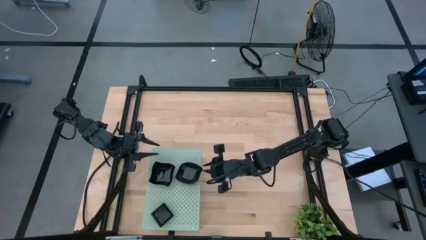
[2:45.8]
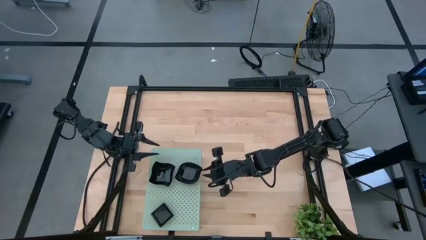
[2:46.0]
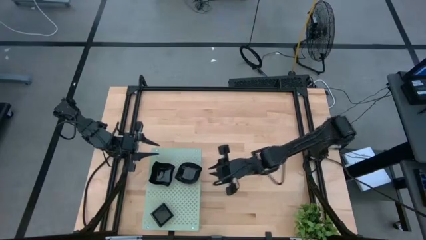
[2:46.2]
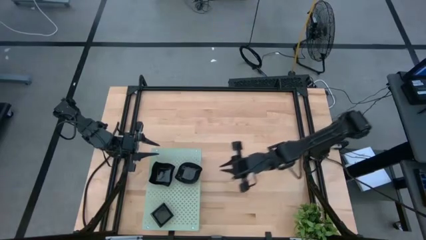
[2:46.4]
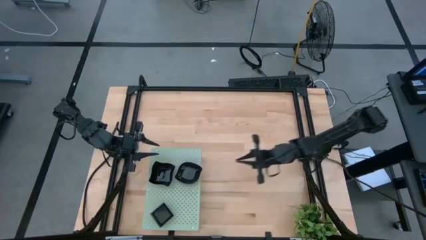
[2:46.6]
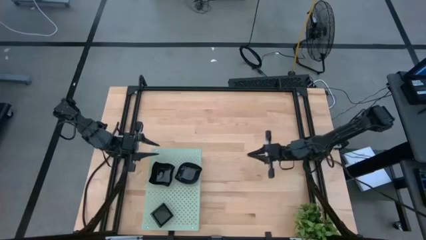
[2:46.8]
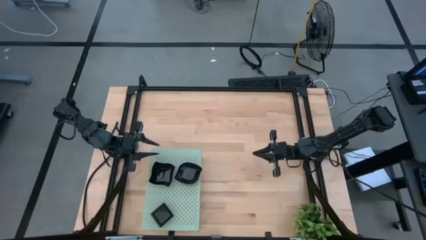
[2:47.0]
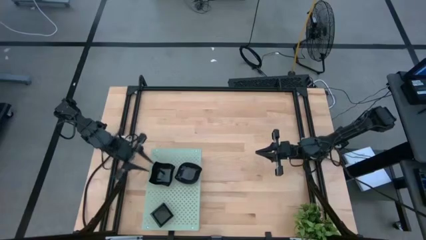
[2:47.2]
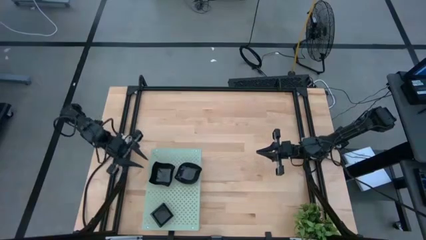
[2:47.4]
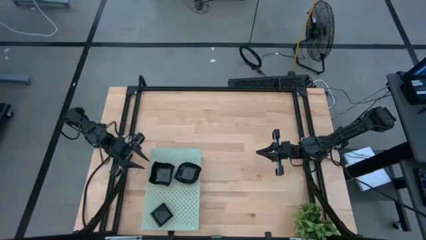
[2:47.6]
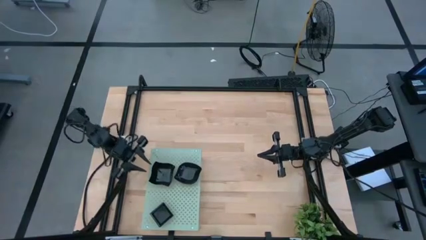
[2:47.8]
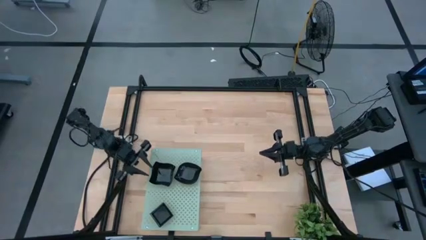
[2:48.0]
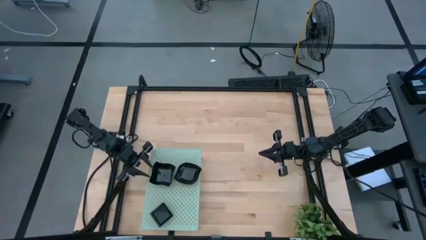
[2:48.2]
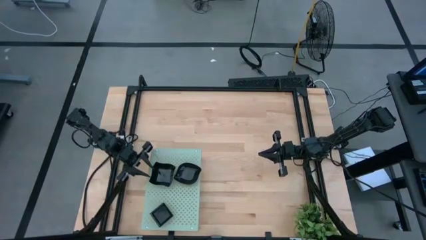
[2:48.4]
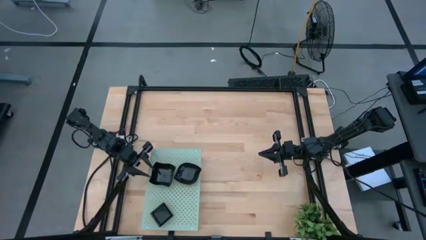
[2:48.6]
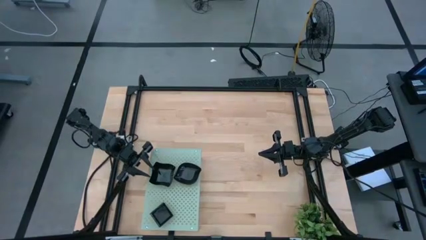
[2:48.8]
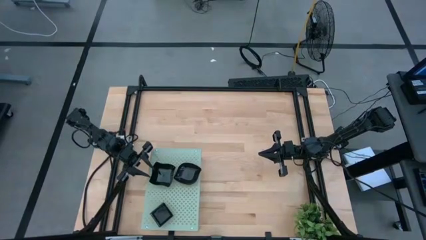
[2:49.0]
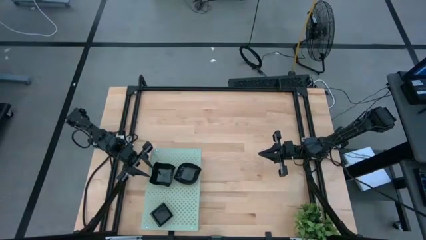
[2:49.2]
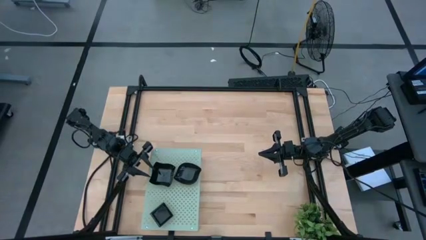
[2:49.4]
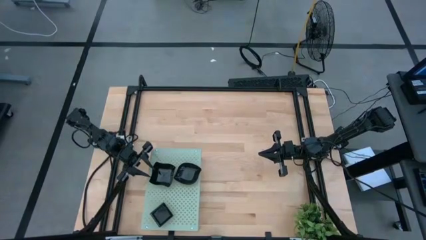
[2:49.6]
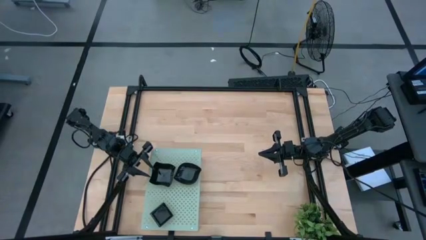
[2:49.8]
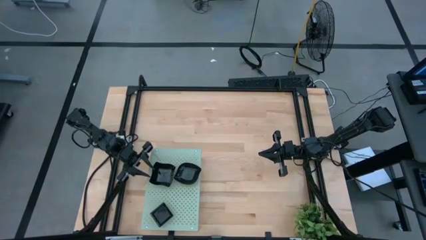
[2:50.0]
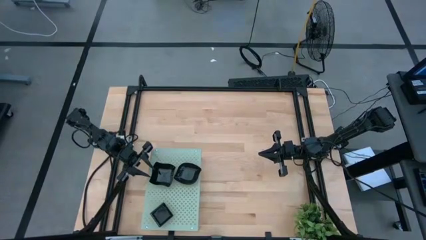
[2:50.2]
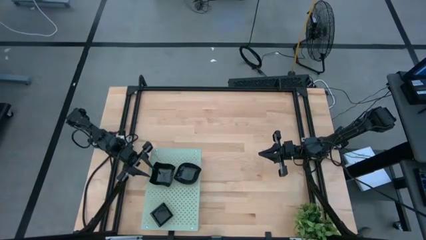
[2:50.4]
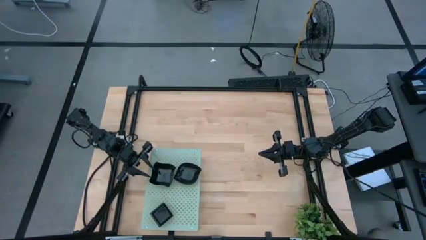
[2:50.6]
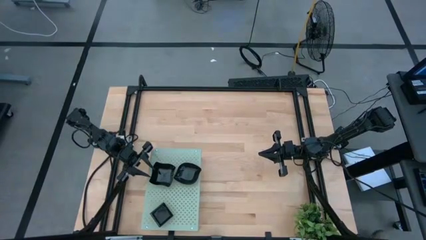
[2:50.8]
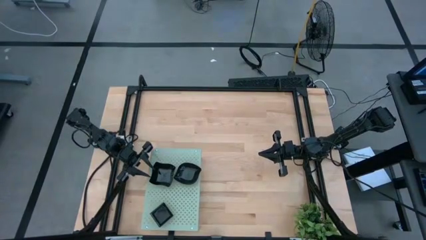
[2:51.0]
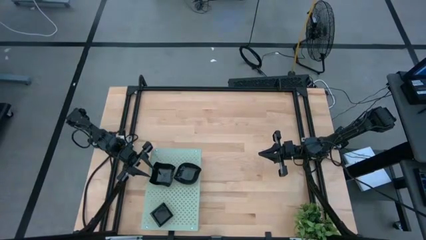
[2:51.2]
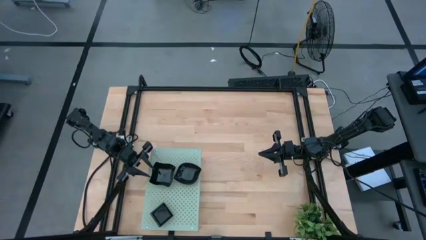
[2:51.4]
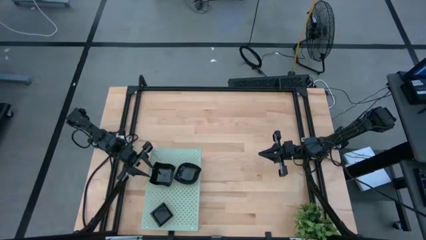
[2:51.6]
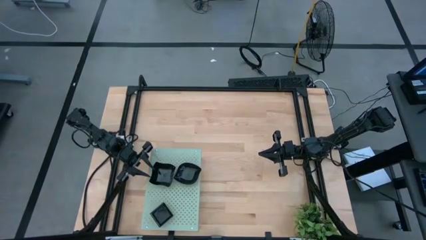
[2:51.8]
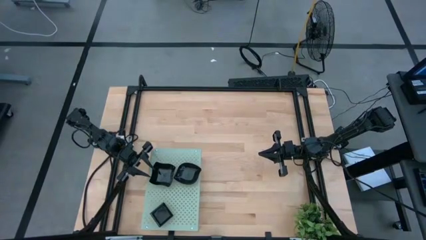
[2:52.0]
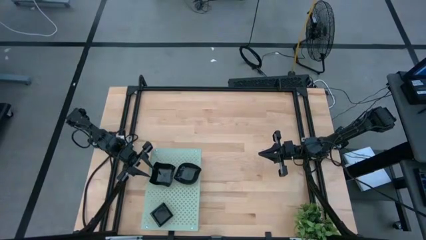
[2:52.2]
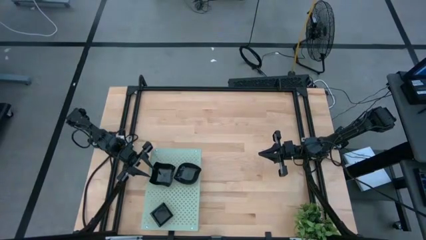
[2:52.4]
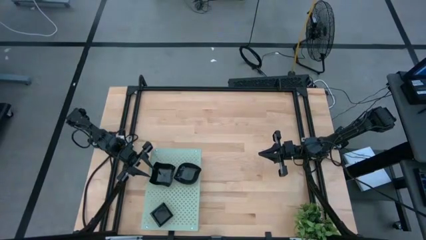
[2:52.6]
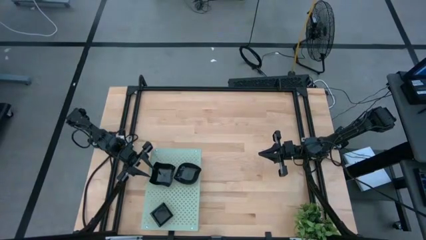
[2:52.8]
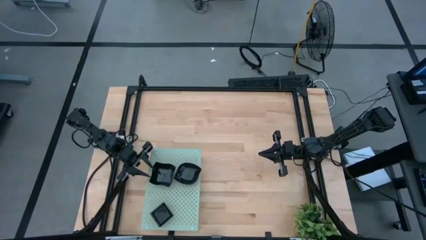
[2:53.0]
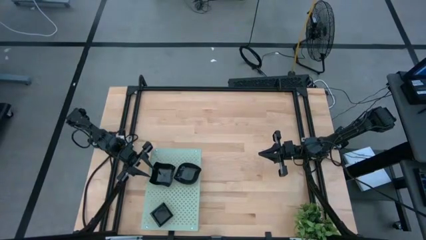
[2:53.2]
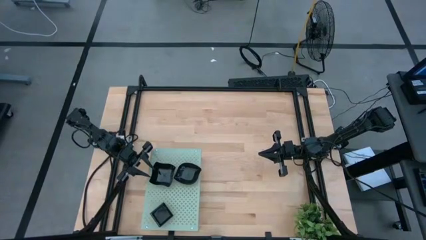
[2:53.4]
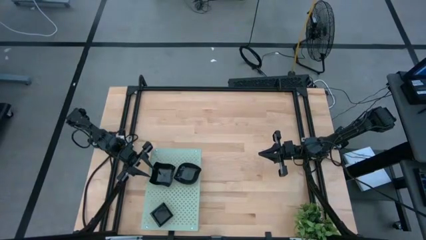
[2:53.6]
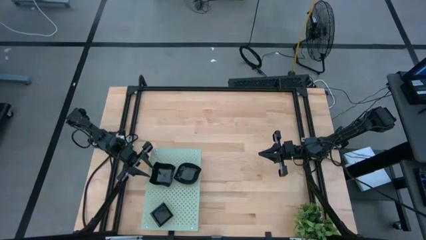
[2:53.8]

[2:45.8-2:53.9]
Task: Pick & Place Mini shaped plates
Return to Home Position

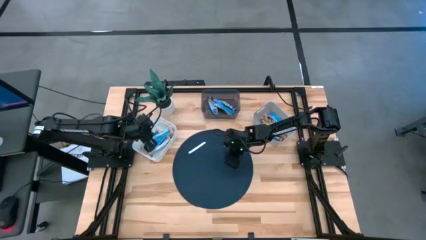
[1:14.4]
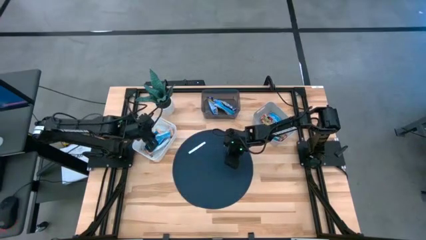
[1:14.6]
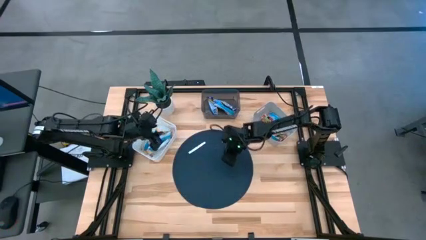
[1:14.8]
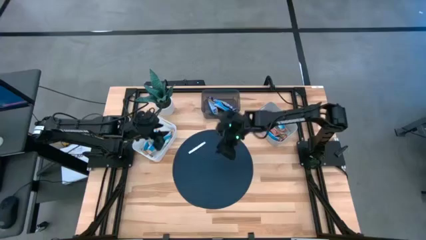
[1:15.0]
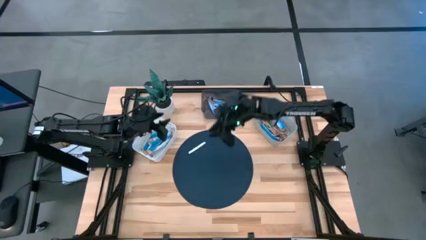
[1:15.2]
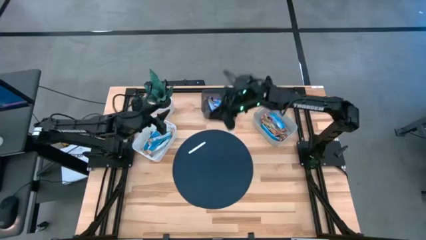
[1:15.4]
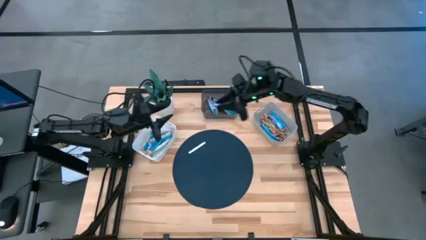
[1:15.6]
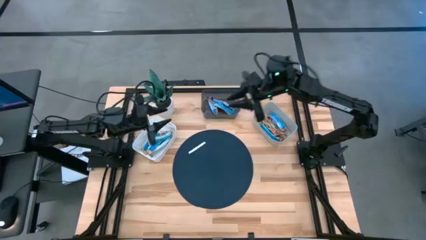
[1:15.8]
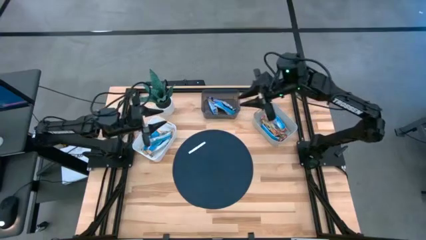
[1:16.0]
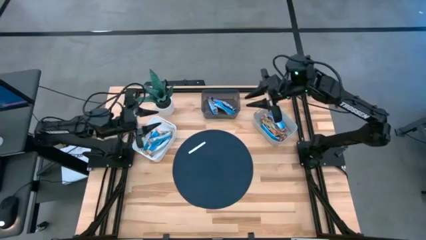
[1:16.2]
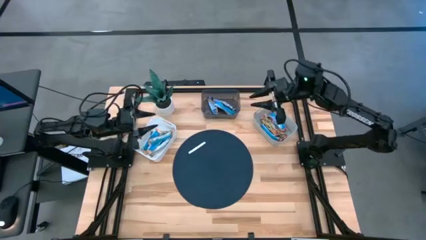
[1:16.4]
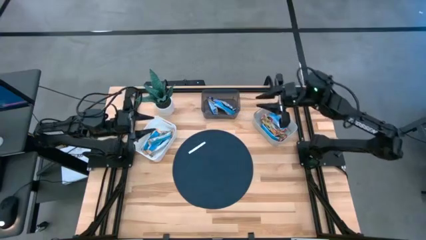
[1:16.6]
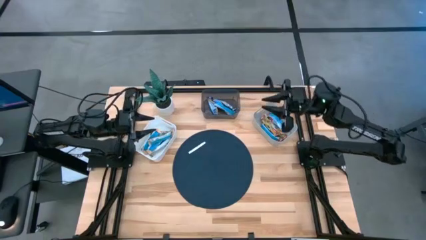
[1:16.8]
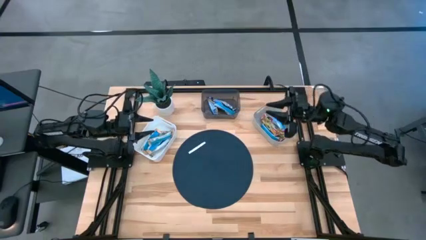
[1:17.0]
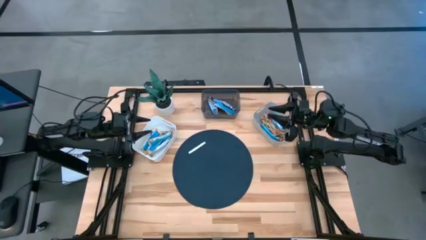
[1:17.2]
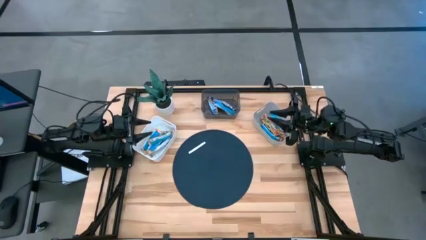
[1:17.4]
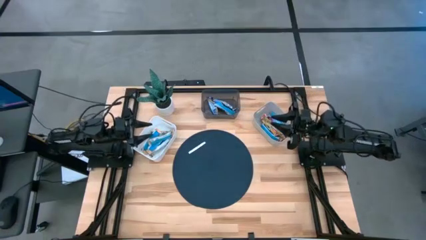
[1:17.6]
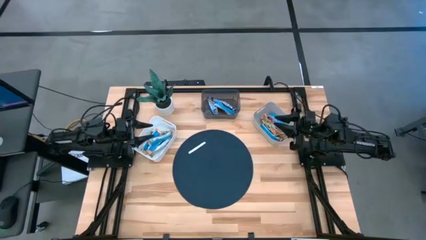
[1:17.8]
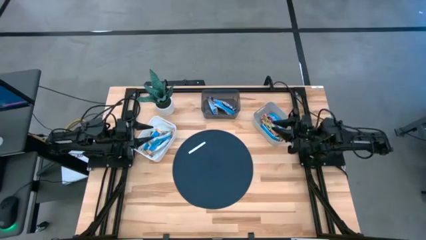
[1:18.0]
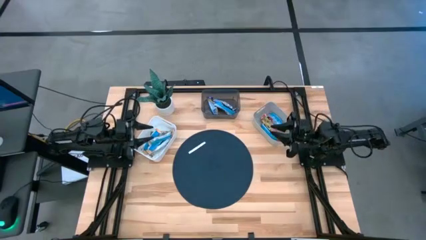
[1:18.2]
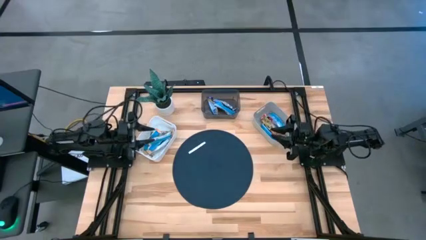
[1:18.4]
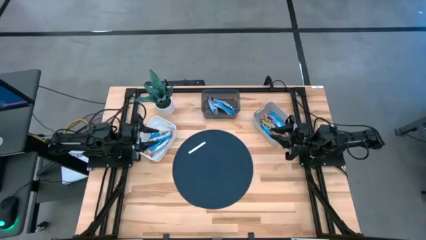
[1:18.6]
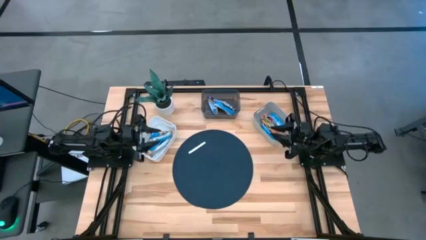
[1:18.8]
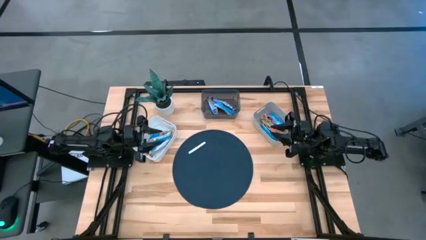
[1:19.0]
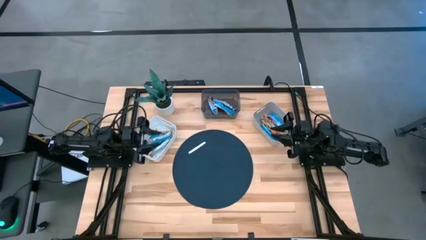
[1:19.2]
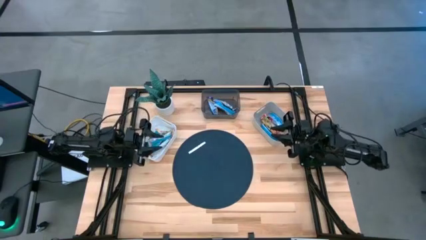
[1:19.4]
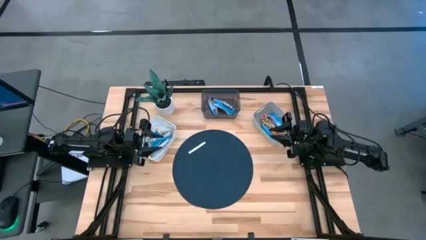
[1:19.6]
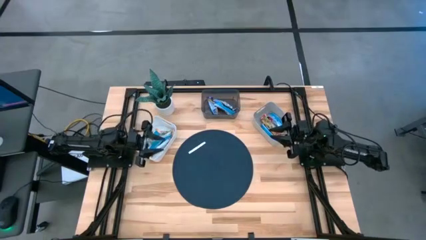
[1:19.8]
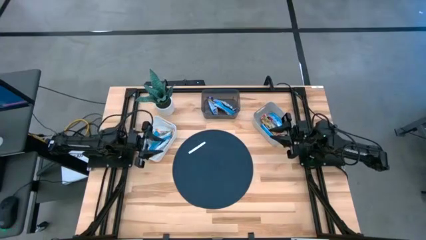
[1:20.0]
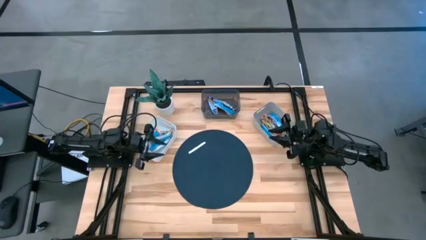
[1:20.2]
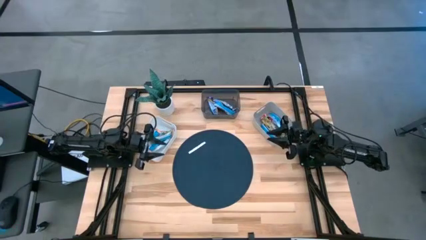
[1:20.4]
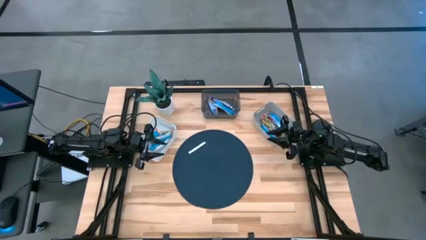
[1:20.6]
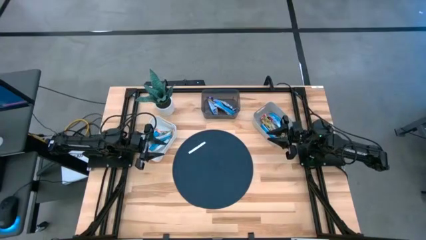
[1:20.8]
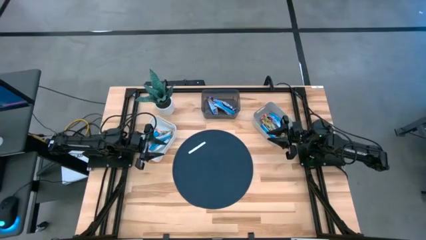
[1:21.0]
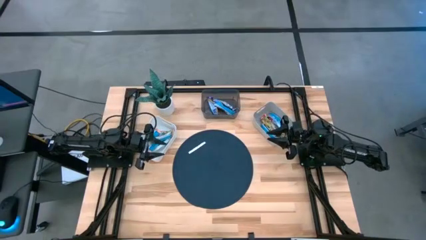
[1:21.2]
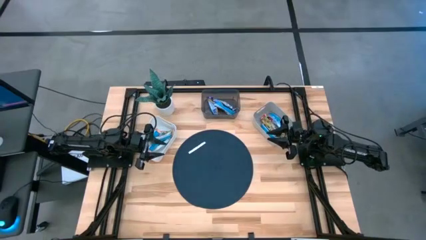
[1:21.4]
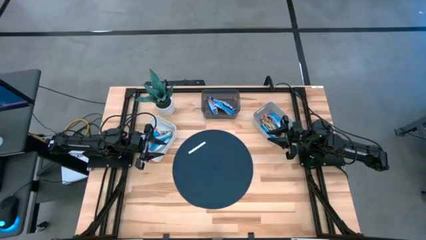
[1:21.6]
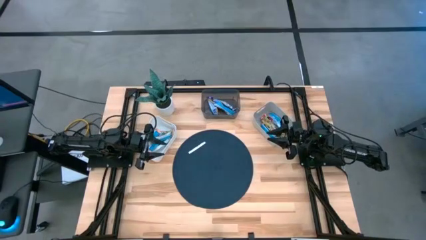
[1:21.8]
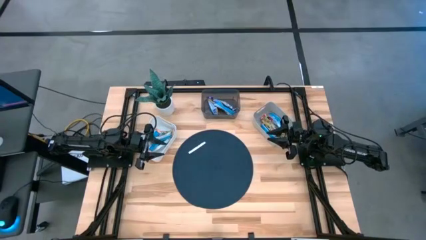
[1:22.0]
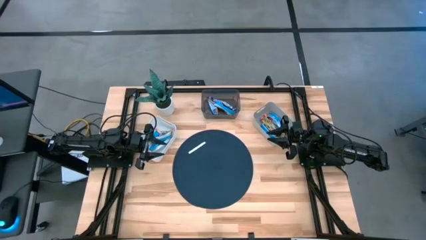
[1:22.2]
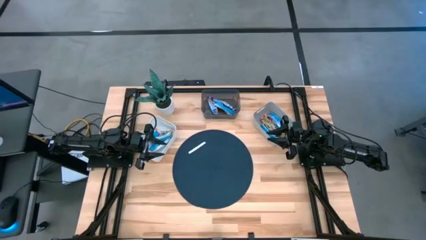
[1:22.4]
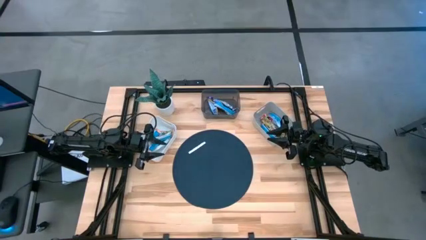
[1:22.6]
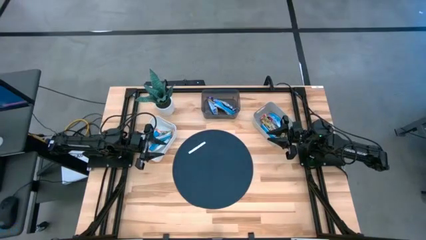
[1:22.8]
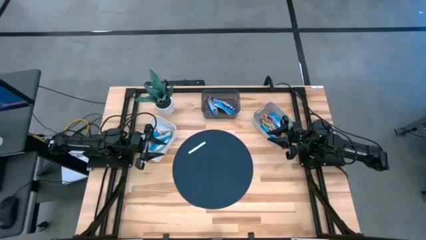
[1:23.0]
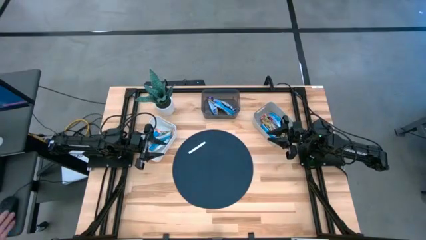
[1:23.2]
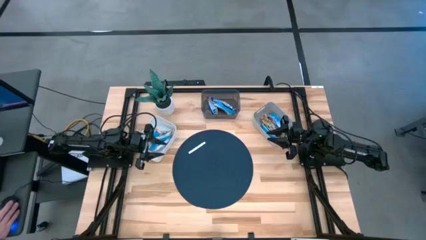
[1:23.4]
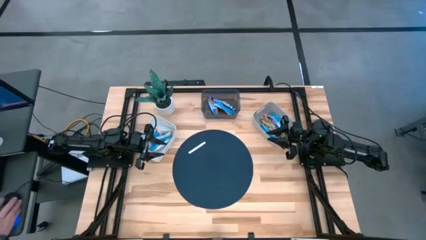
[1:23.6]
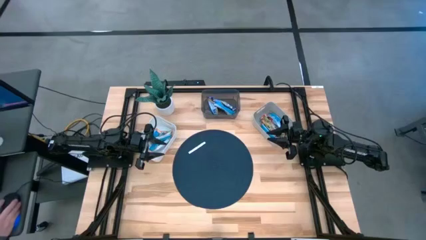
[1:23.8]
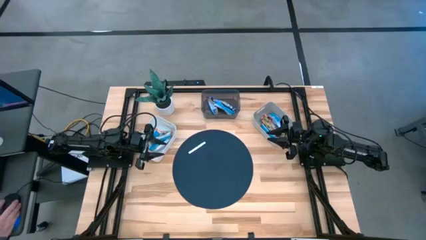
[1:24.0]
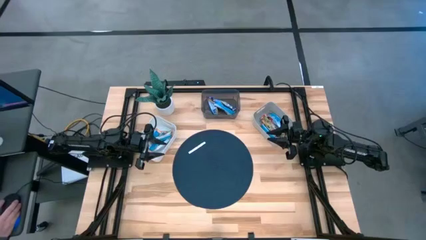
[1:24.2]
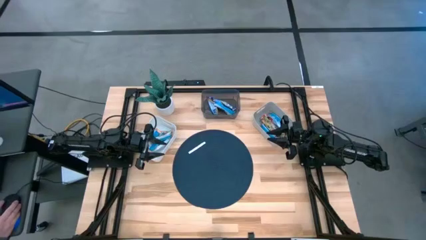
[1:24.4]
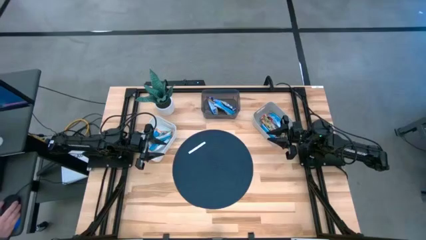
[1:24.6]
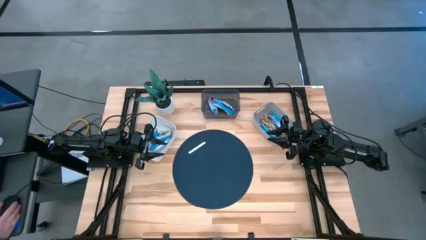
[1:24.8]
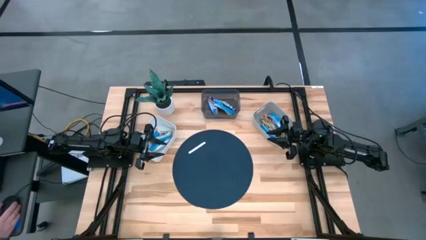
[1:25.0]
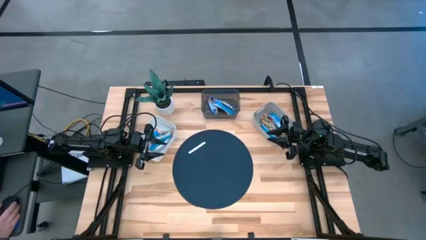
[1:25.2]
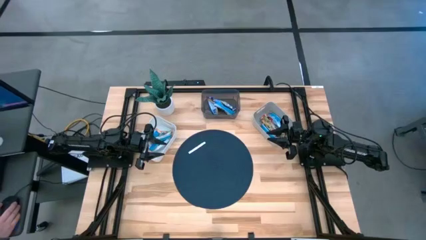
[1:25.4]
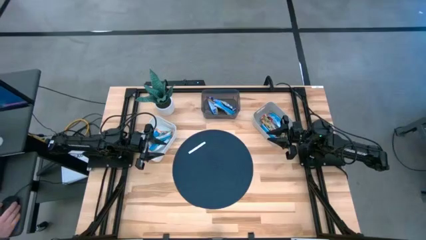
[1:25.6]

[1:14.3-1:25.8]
Task: Pick and place Granola Bars by type
Return to Home Position
